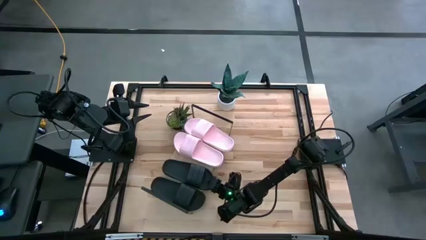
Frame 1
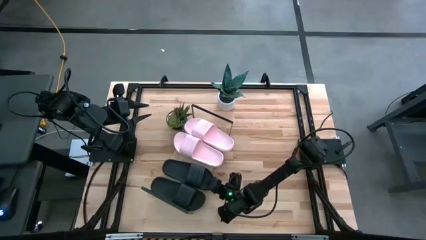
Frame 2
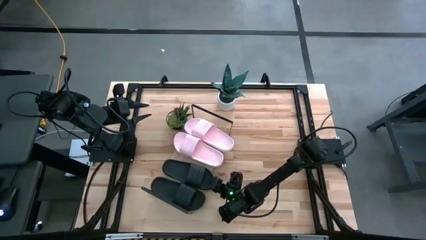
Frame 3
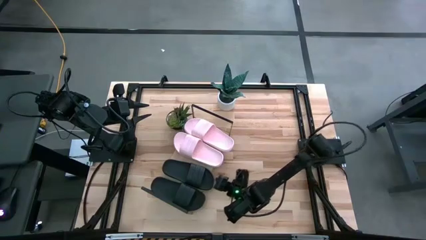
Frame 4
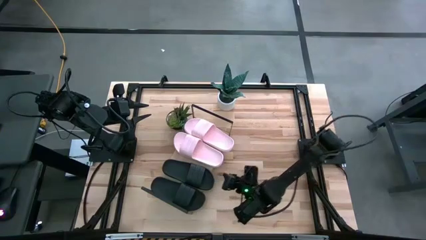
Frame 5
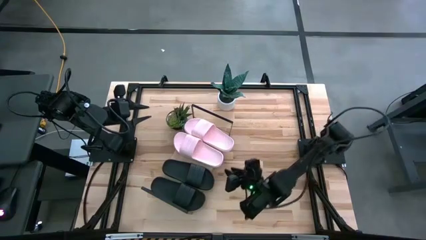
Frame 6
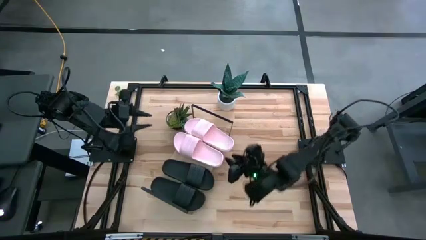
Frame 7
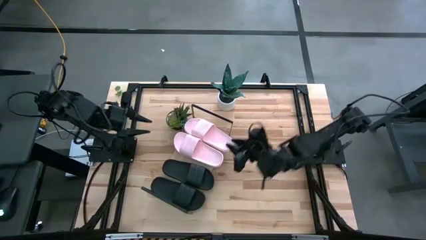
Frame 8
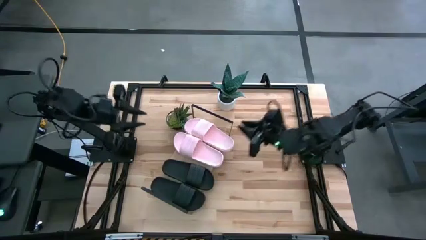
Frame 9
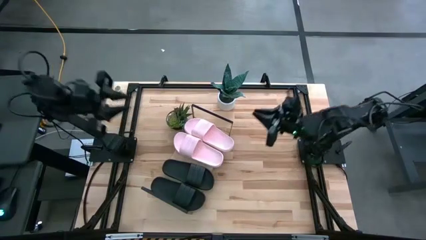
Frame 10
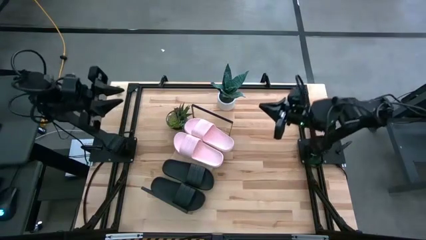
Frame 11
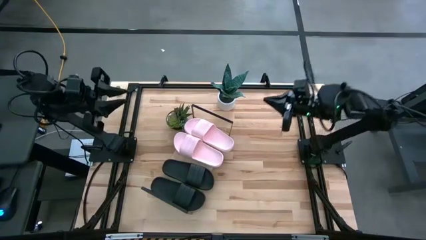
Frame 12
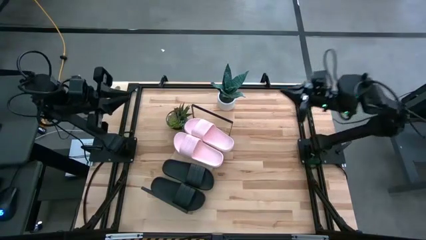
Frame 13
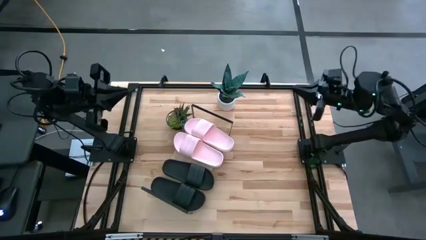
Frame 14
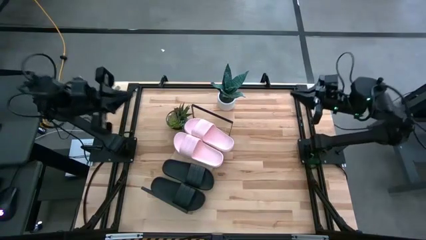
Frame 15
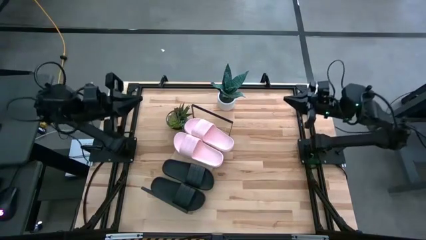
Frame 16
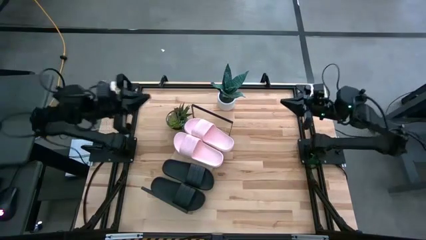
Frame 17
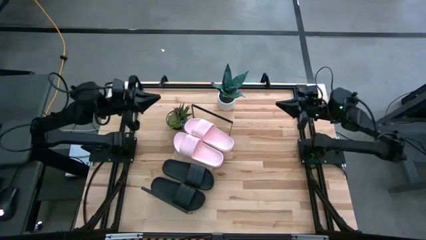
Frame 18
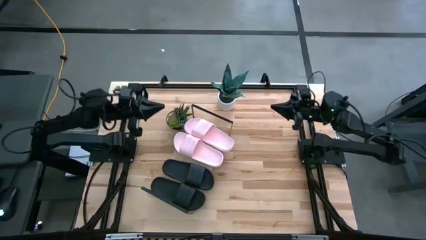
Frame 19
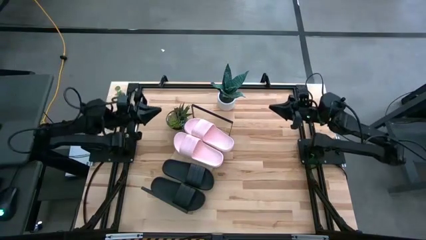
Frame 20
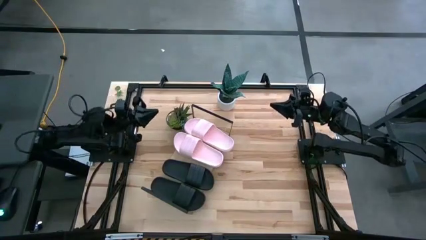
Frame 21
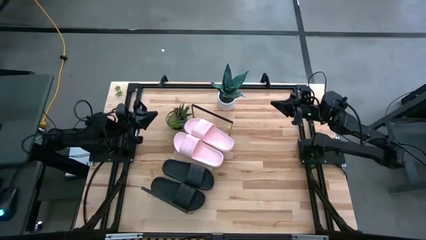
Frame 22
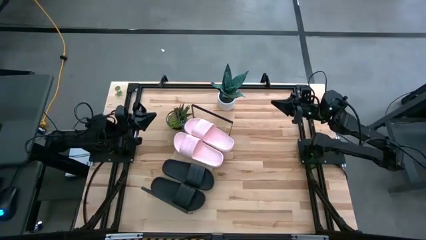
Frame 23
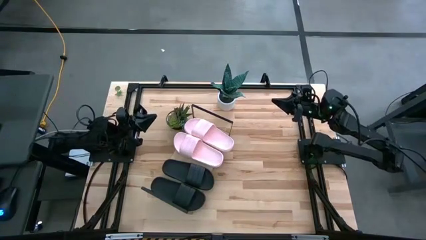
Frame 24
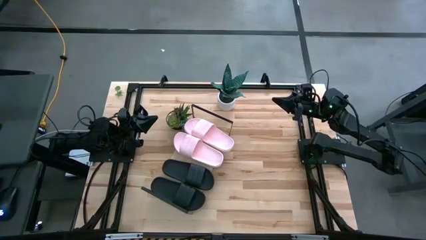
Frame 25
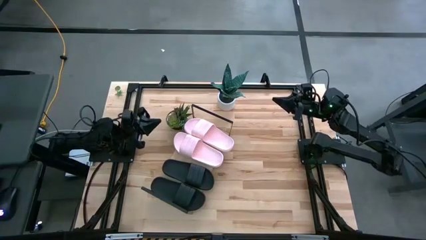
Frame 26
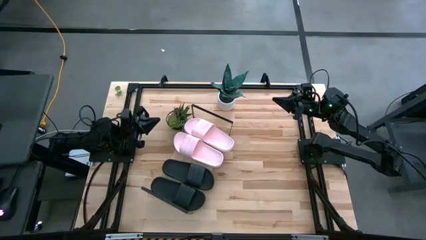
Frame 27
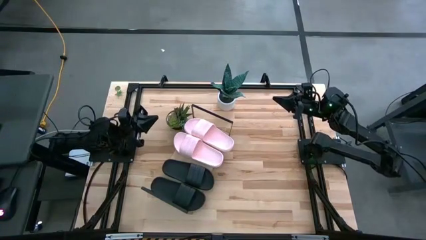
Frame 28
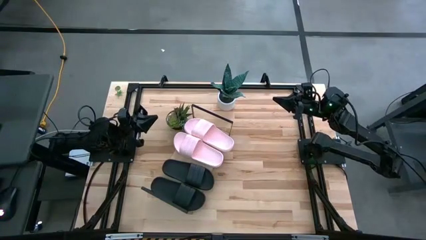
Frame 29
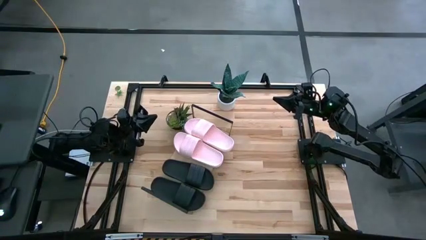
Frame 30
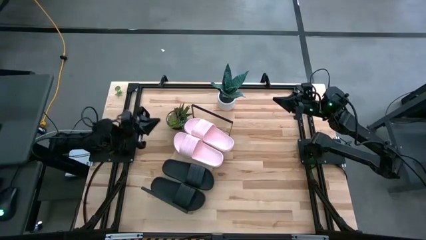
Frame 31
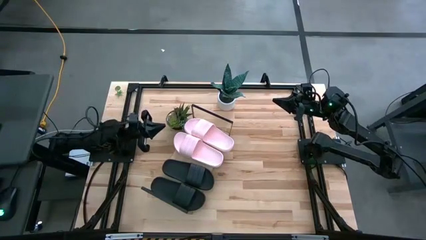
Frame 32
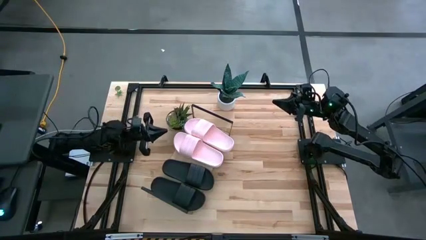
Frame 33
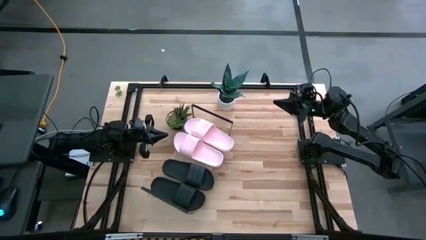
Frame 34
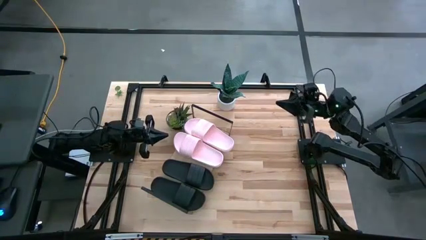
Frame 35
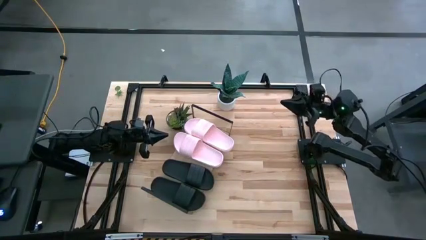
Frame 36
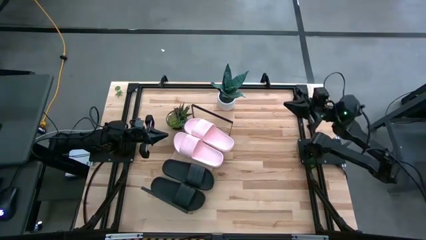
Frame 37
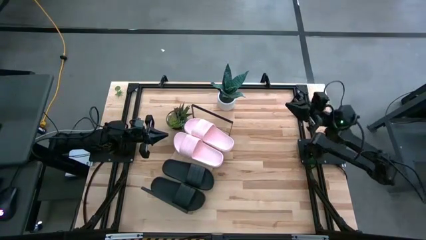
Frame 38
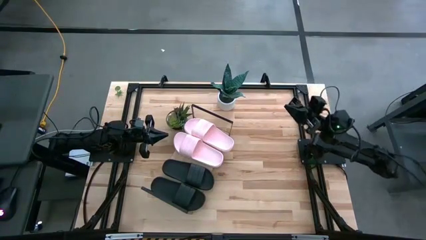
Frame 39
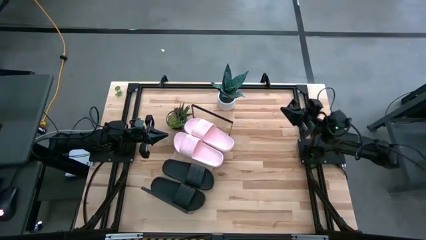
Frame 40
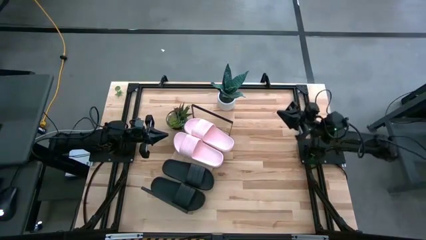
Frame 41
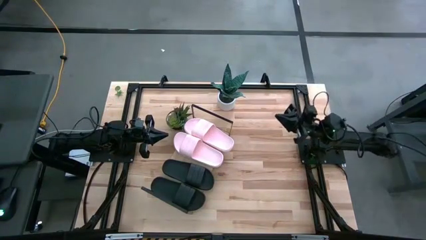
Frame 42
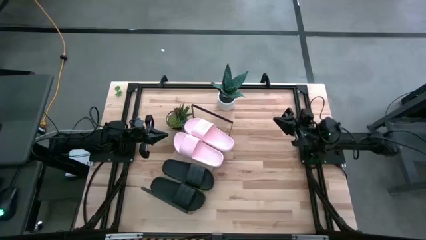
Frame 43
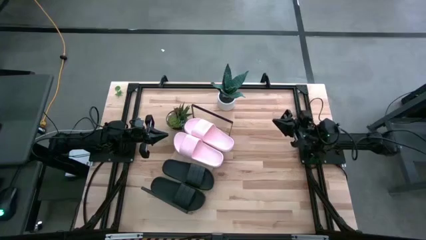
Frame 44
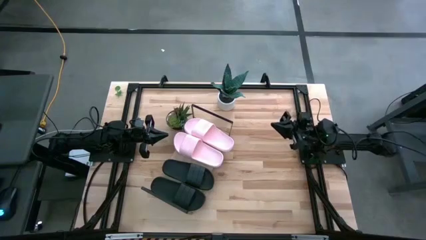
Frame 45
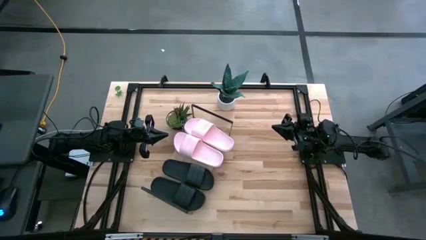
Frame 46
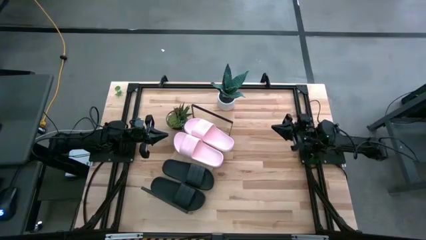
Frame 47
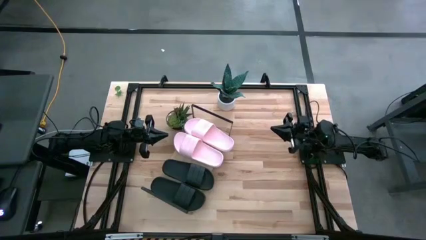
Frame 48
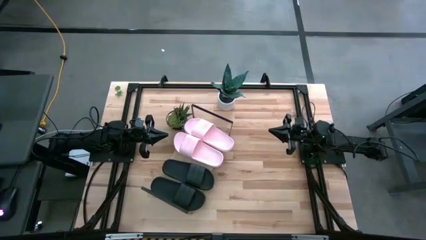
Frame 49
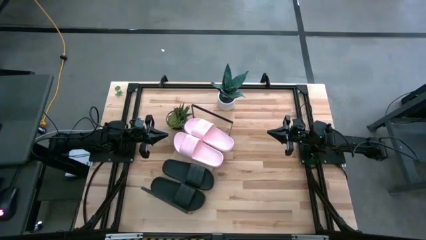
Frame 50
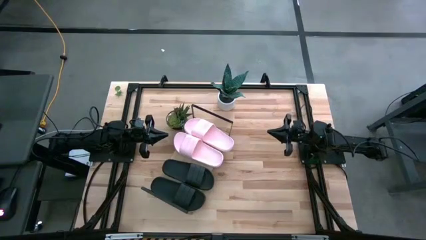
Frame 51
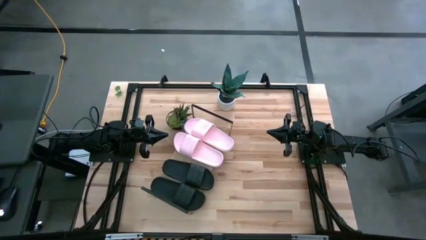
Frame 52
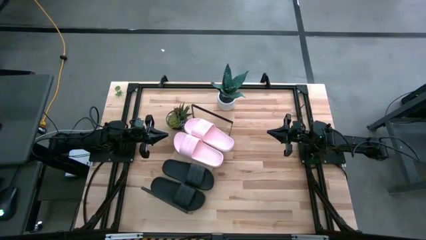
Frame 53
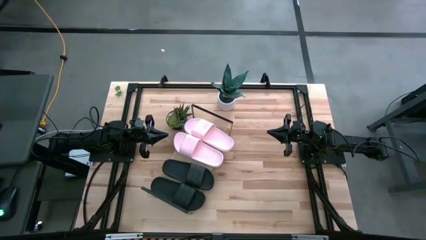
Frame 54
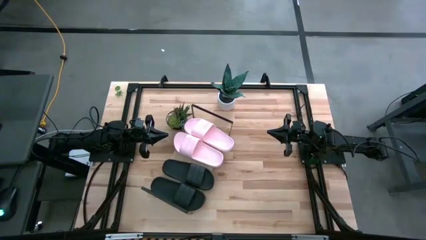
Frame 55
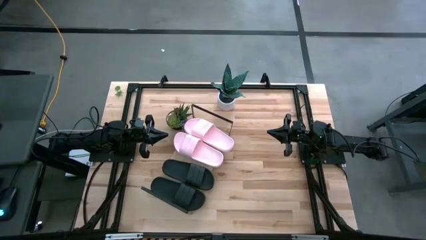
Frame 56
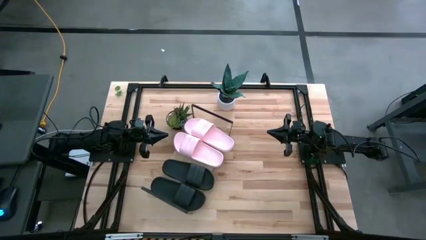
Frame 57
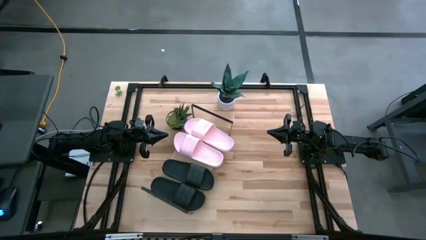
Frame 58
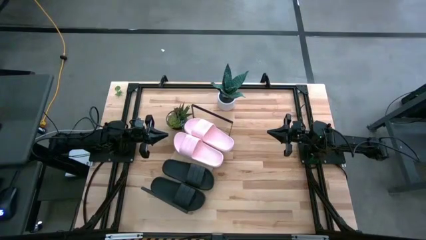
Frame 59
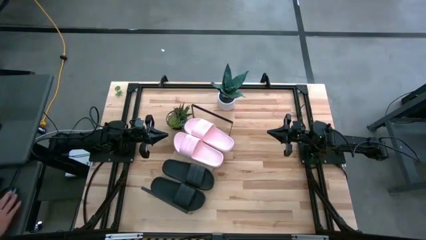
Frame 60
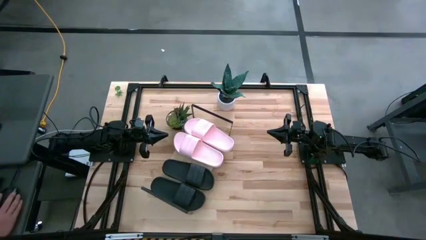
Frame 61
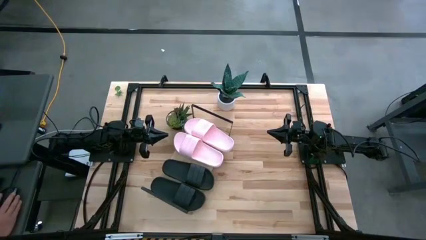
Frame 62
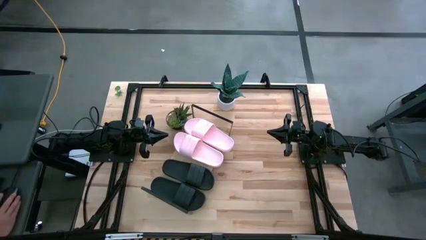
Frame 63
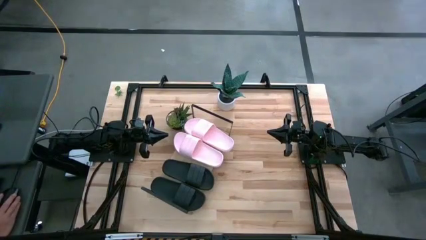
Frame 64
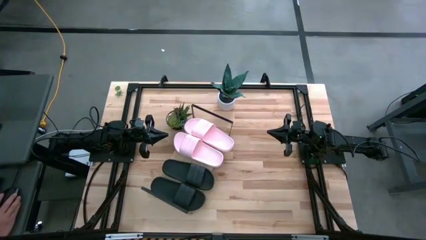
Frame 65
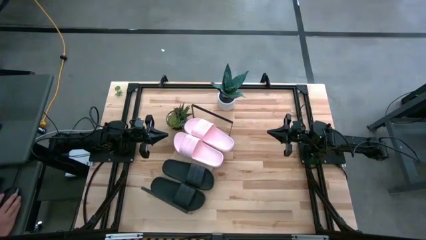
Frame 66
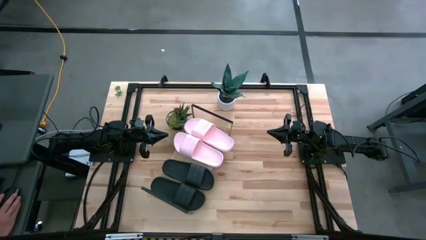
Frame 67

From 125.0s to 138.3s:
Task: Pick and place slides into the shelf
Return to Home Position

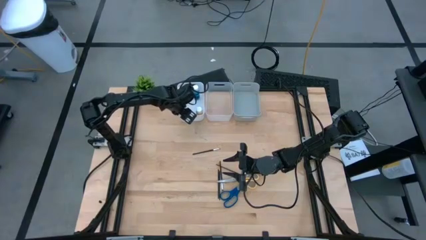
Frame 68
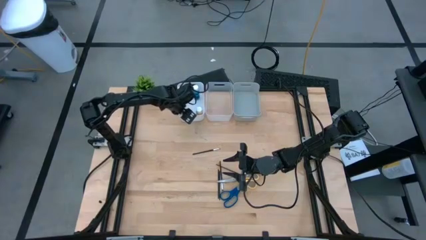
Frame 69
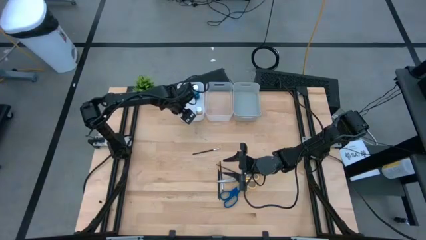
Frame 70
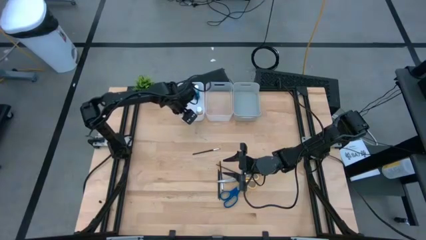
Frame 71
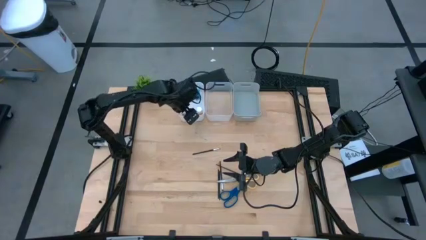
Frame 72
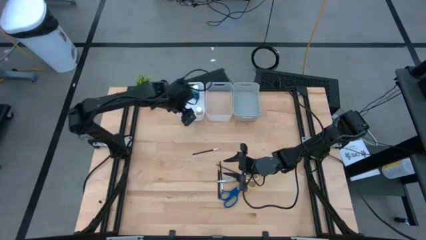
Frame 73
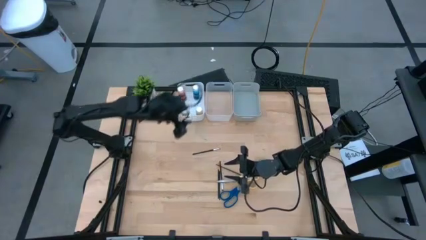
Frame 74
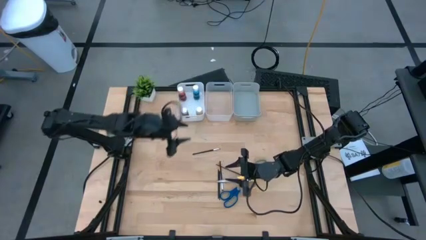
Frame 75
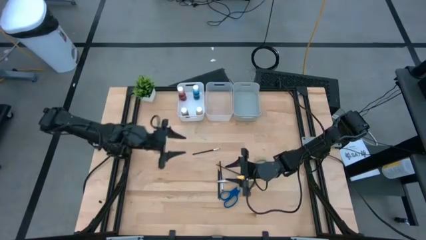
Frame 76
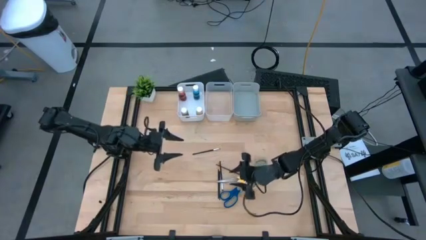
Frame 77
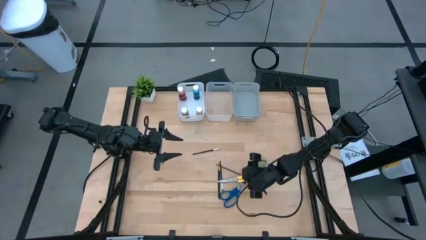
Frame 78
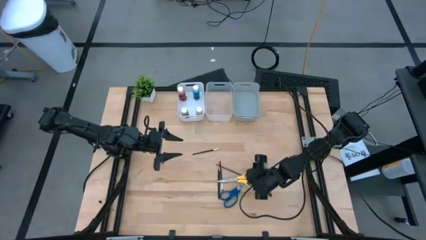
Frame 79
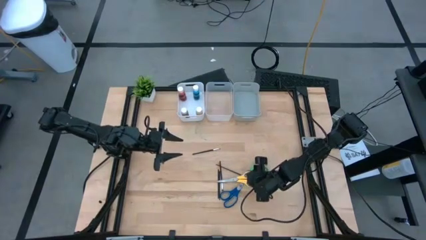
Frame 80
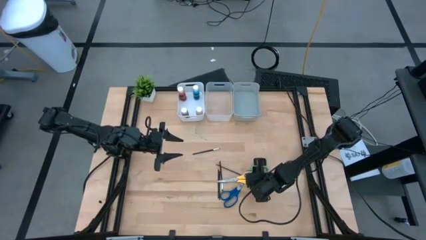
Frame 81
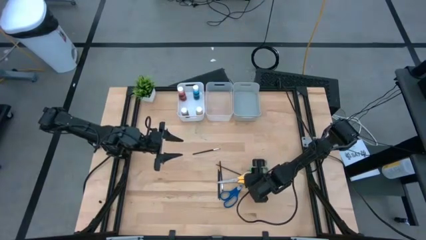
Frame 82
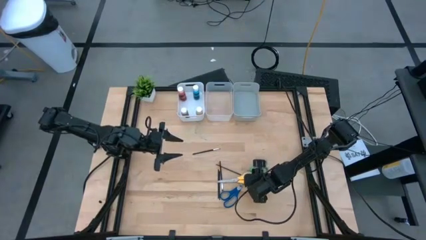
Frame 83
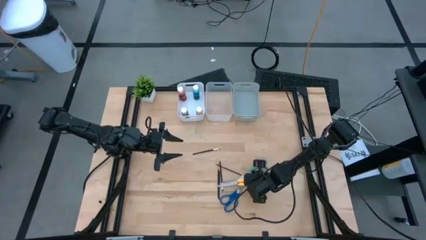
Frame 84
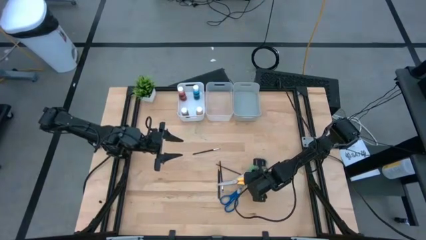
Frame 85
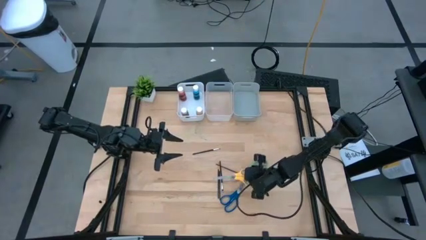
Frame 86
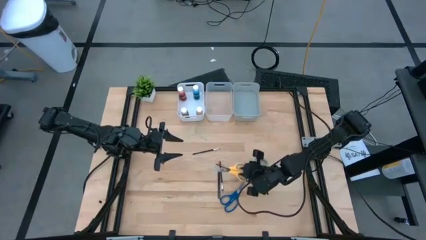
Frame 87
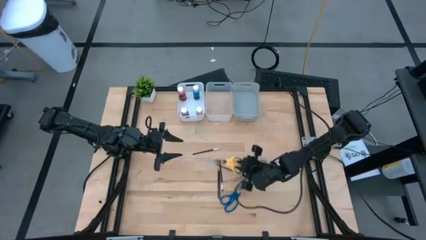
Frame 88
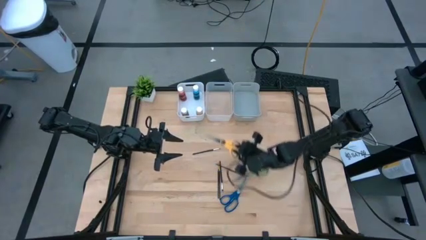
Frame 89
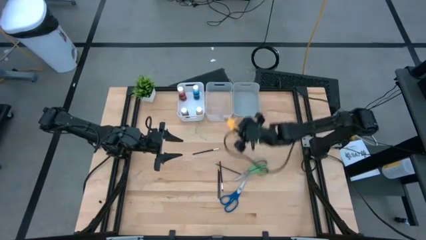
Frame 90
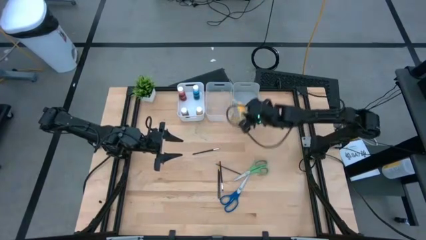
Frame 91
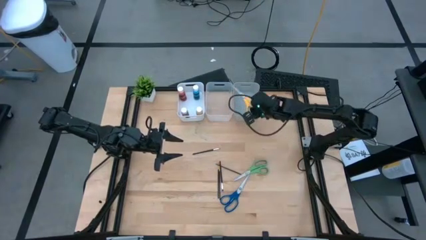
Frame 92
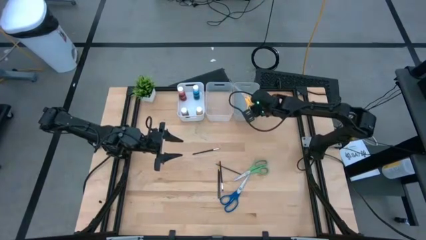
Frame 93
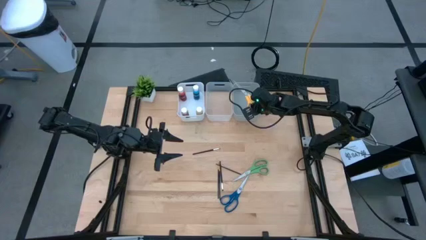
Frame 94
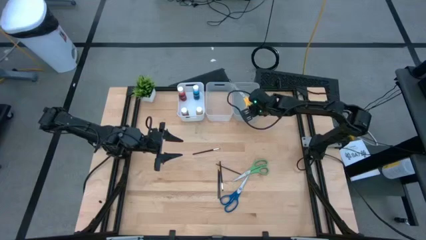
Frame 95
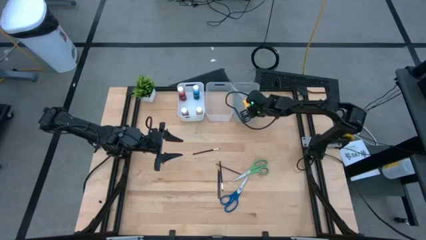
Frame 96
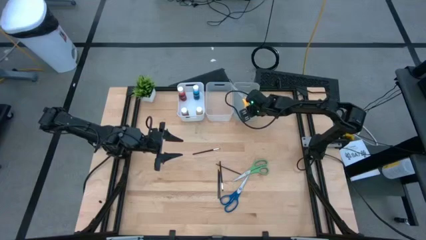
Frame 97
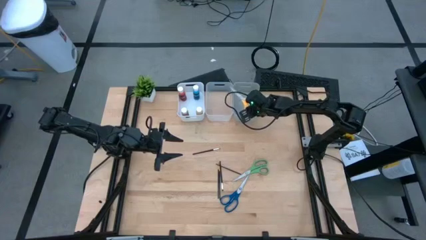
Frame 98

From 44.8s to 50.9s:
Task: Pick & Place Paint Supplies
Put the yellow scissors into the gray bin
